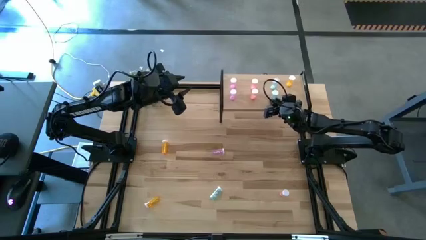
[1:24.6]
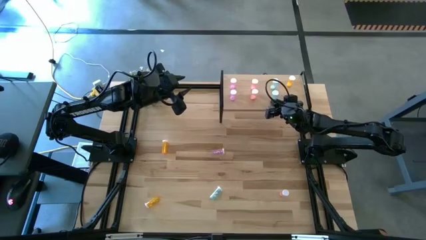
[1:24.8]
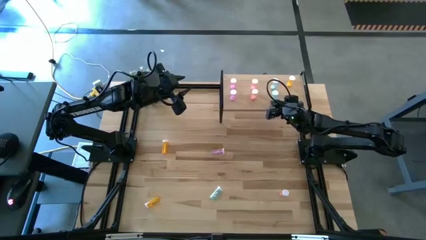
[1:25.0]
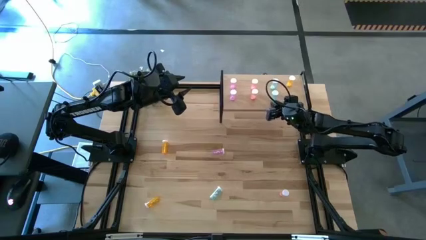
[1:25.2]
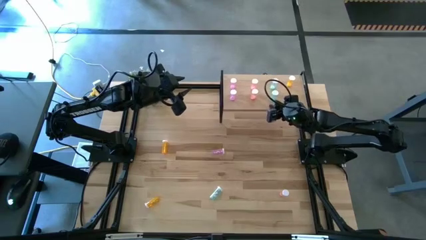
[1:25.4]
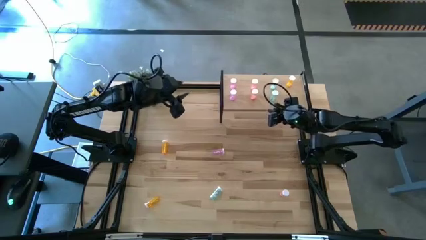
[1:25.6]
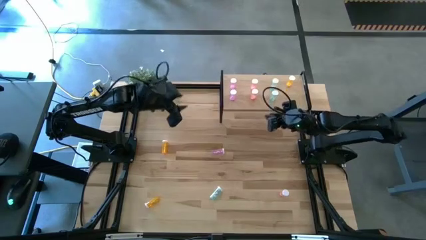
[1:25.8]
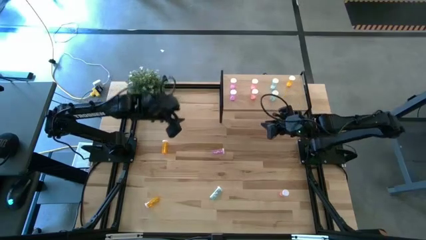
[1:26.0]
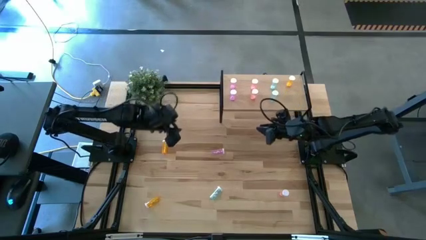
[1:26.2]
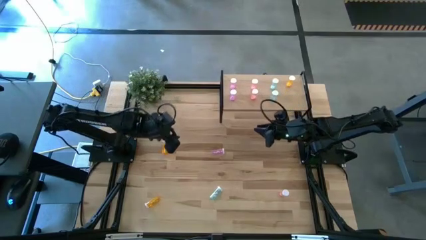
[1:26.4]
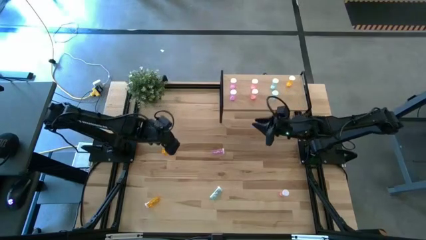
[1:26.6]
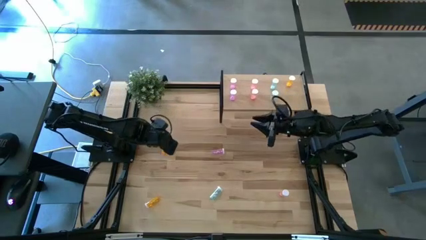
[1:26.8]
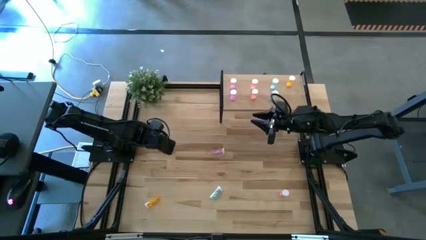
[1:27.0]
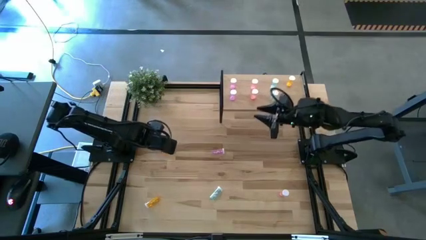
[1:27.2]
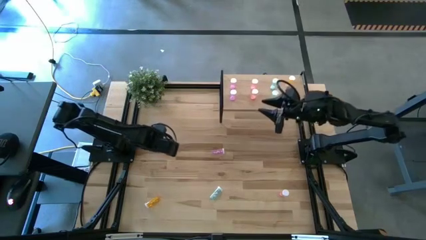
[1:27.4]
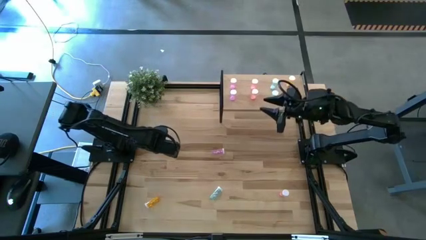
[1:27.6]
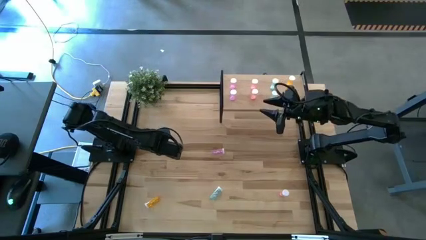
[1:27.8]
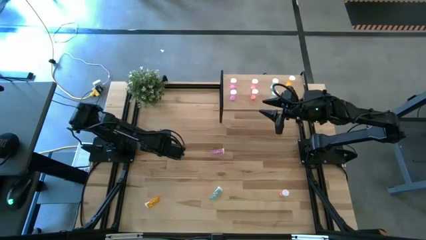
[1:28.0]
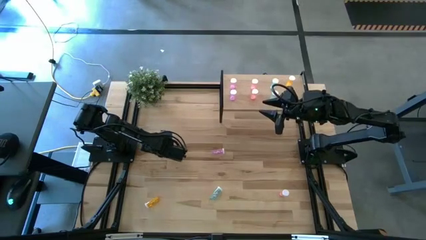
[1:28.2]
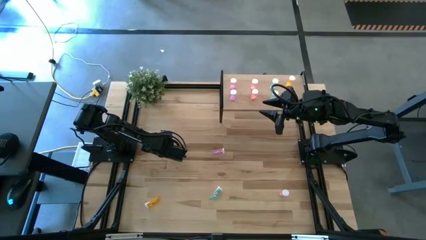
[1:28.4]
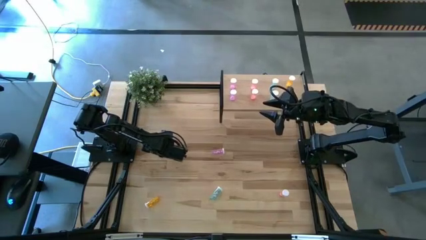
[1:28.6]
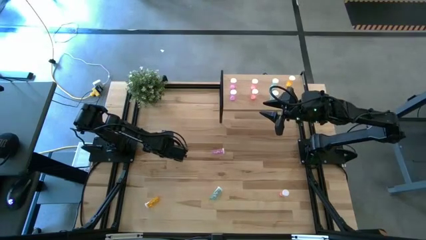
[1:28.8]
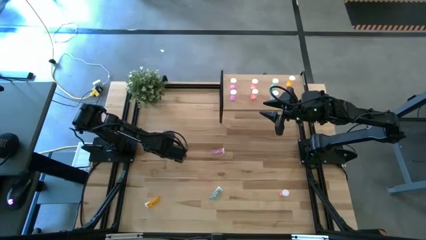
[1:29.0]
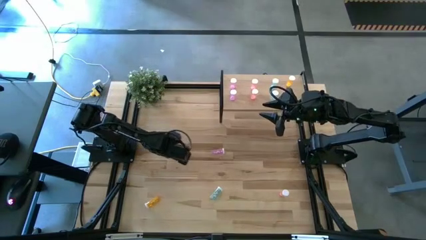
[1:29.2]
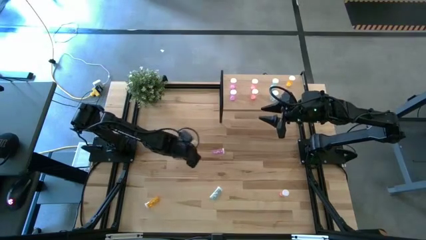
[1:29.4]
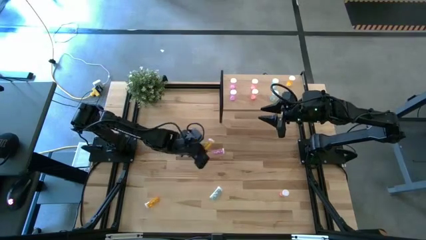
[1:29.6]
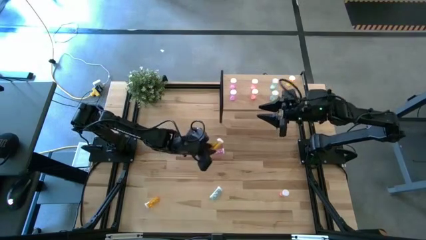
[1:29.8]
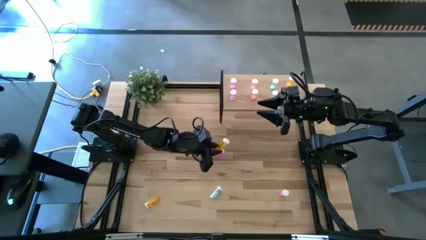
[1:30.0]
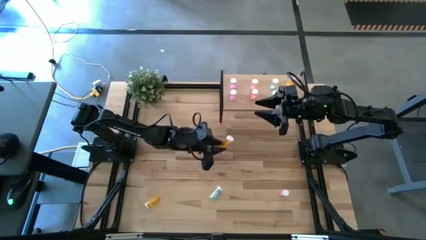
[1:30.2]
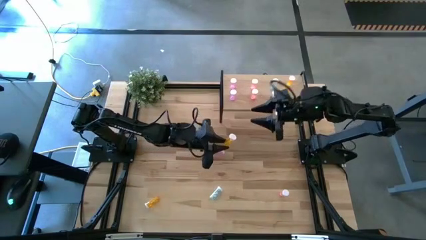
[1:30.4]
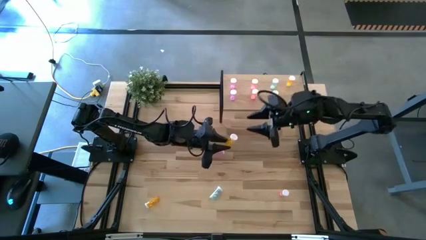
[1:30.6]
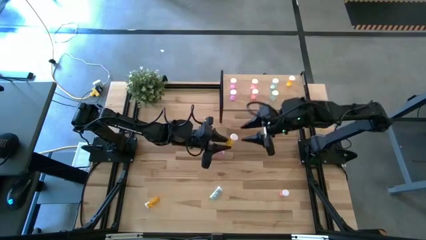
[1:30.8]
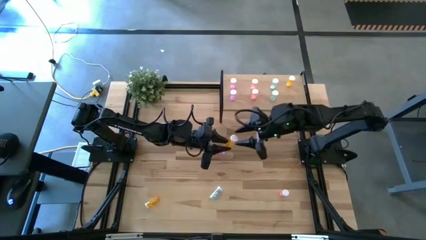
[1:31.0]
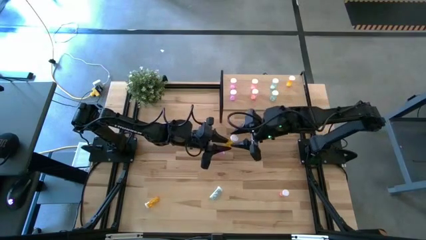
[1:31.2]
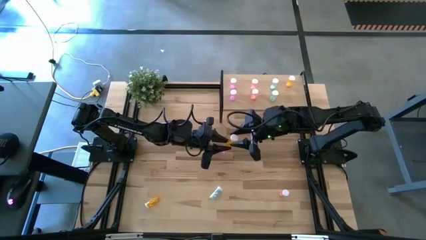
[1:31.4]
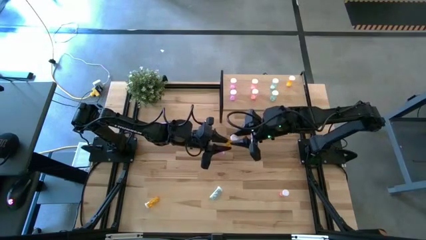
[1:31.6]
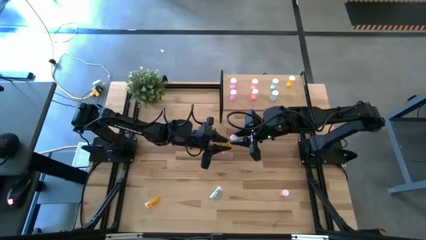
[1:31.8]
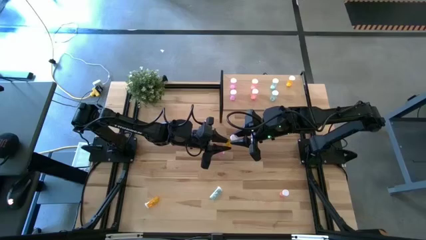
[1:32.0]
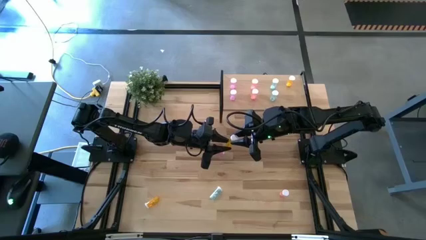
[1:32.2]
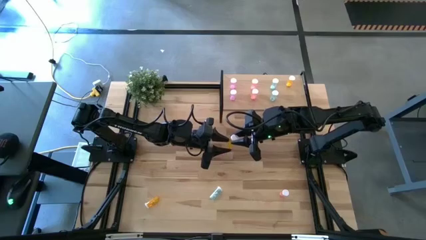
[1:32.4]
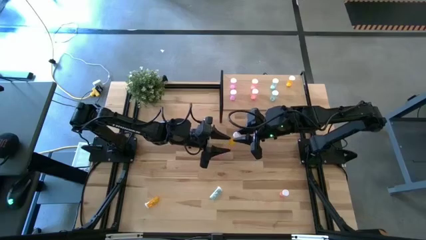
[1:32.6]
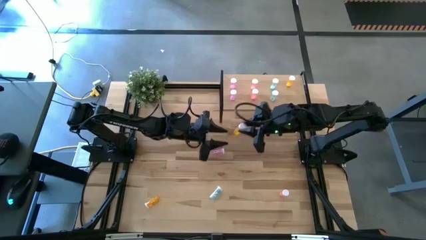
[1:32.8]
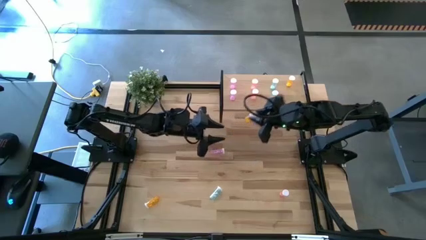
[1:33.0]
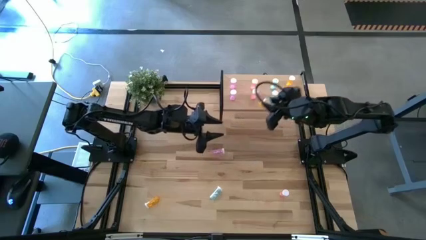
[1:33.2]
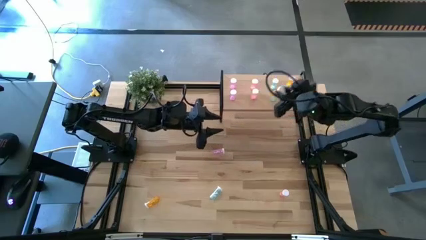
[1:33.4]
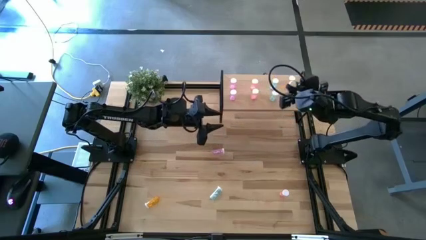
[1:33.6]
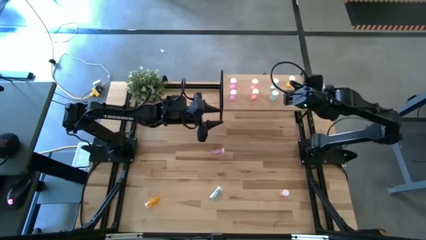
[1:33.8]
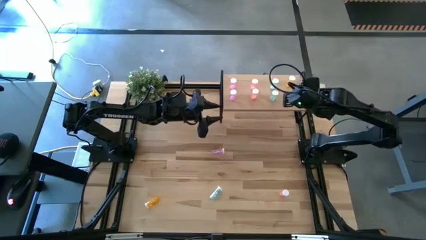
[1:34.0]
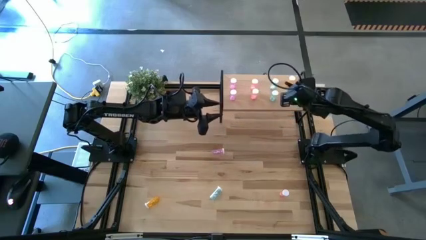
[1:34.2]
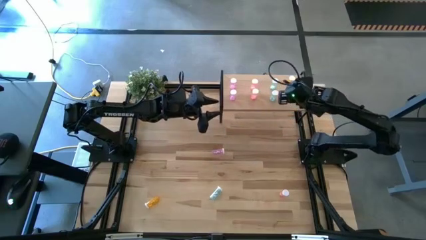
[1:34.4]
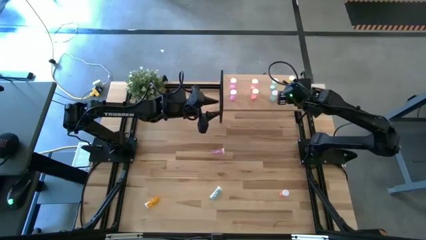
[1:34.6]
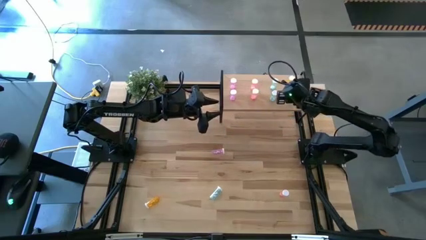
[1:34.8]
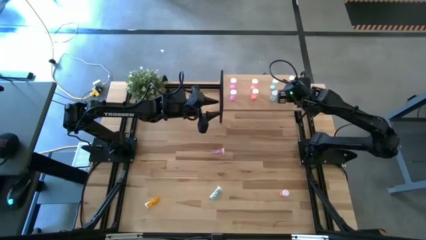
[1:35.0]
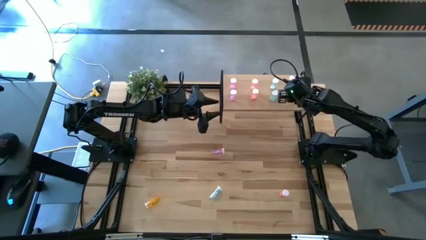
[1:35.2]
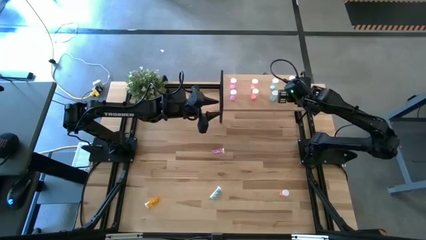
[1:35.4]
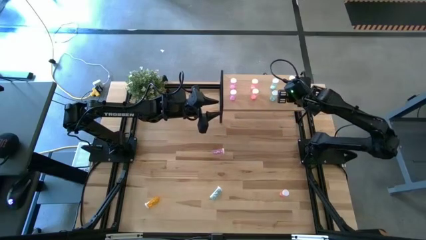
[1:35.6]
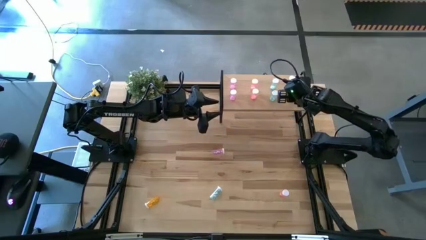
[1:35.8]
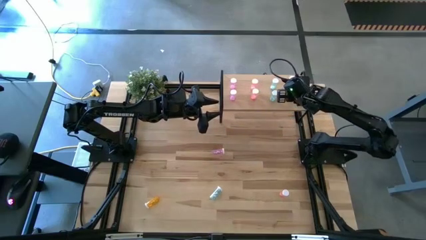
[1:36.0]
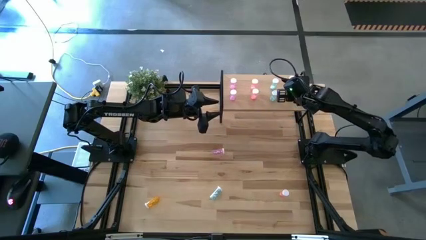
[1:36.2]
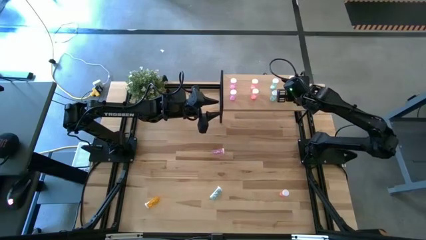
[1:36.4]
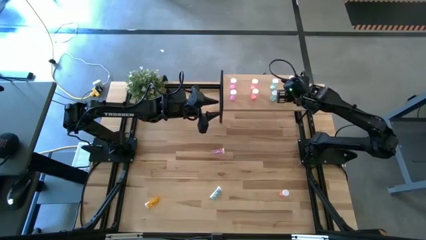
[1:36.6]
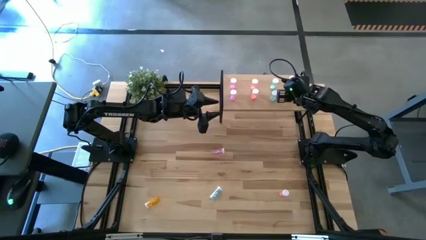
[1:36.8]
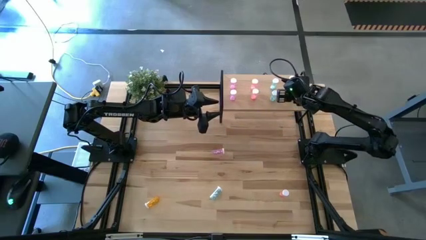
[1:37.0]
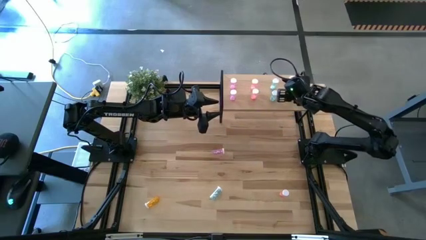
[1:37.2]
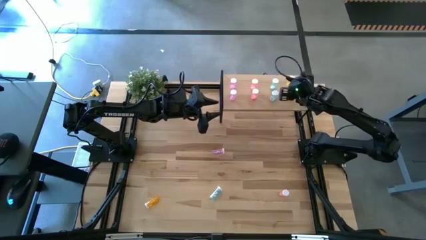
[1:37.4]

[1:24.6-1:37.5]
Task: Pick and place medicine bottles onto shelf by color
Put the top orange pill bottle on the shelf aligned with the other orange pill bottle
